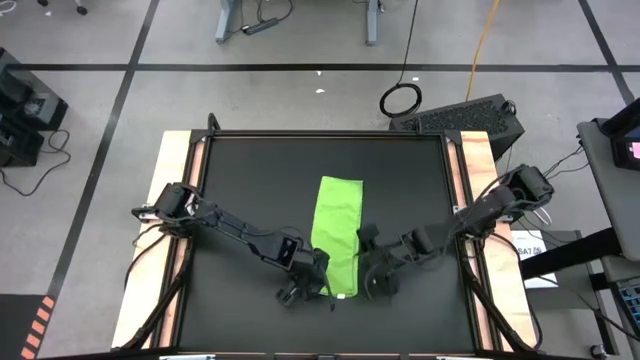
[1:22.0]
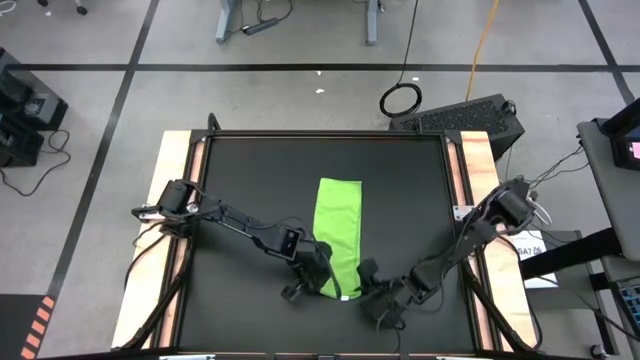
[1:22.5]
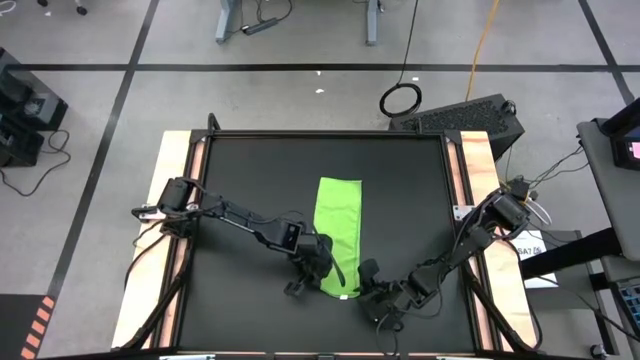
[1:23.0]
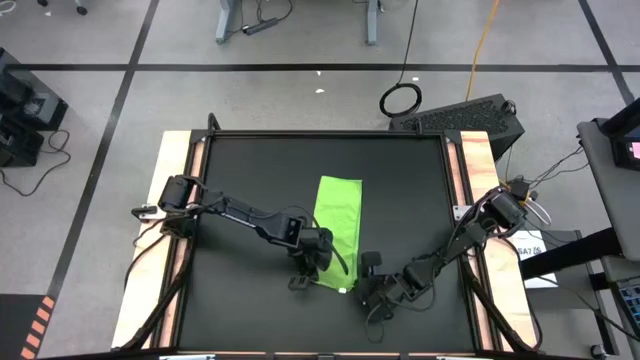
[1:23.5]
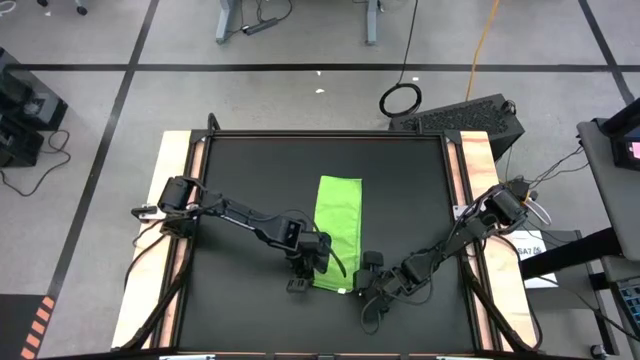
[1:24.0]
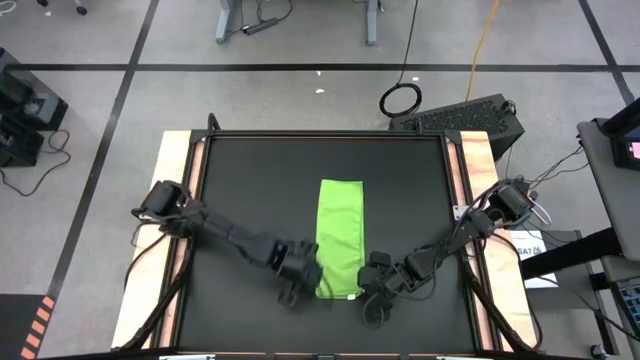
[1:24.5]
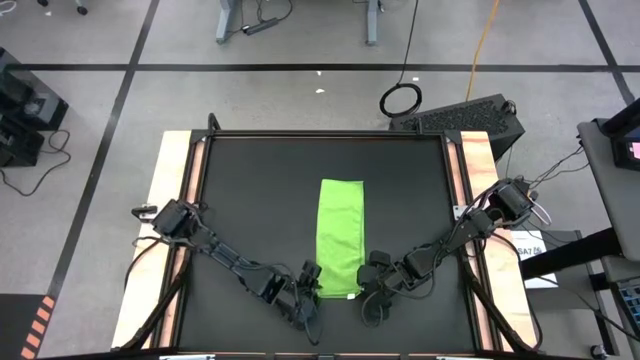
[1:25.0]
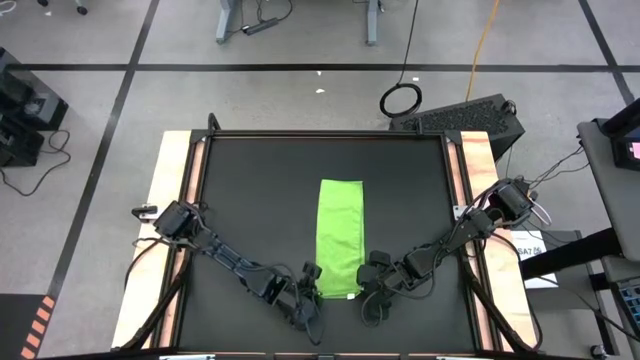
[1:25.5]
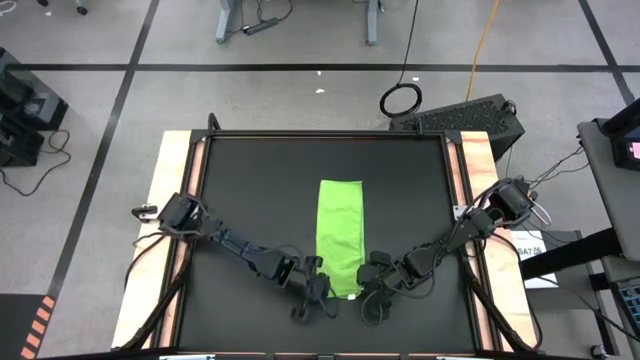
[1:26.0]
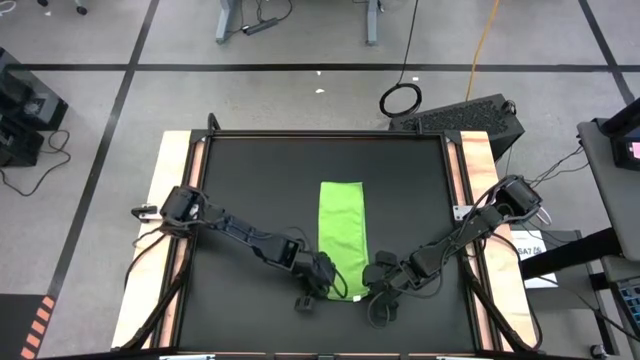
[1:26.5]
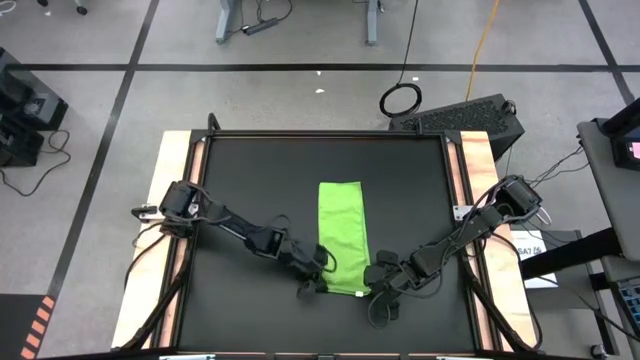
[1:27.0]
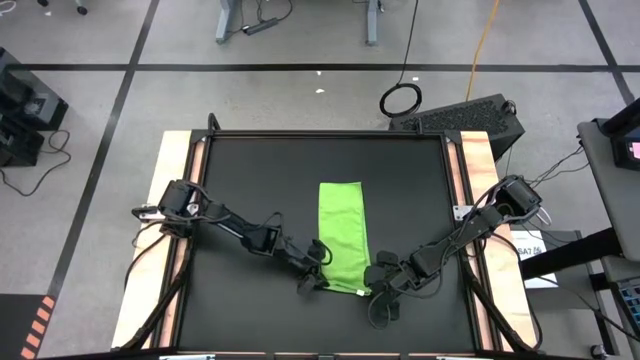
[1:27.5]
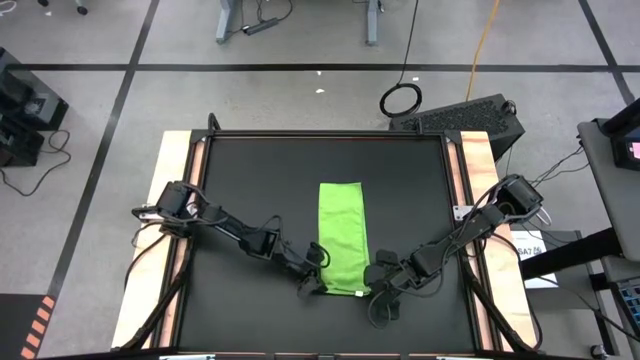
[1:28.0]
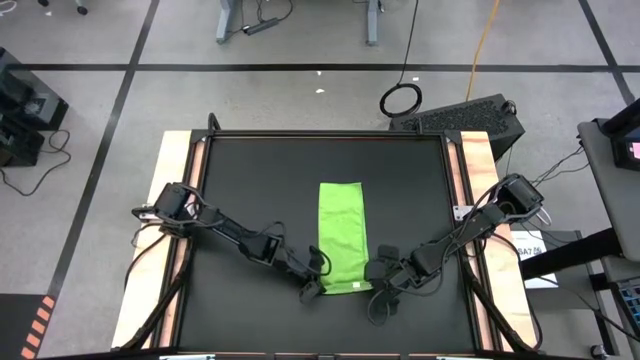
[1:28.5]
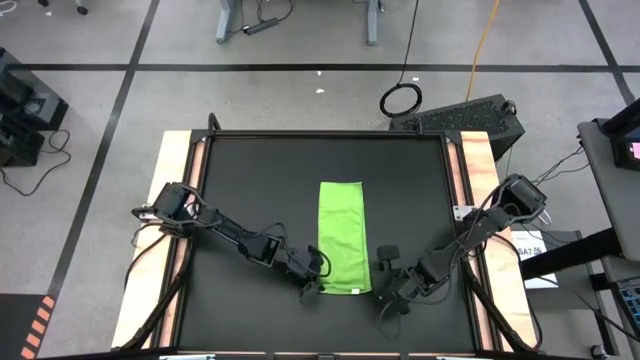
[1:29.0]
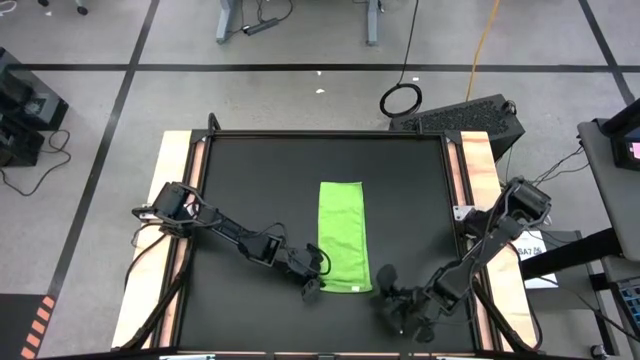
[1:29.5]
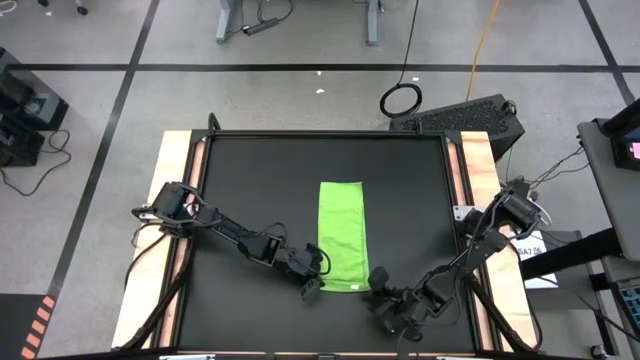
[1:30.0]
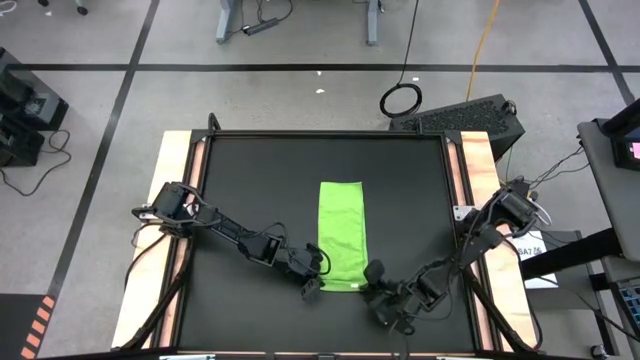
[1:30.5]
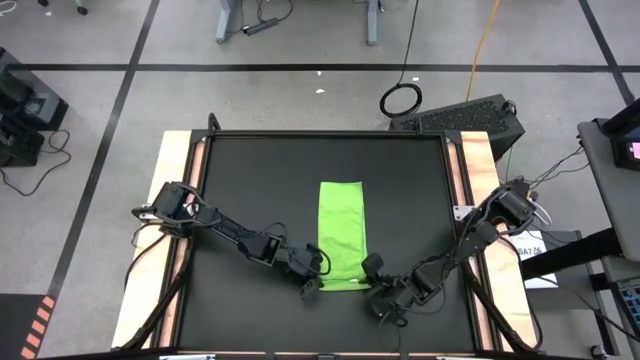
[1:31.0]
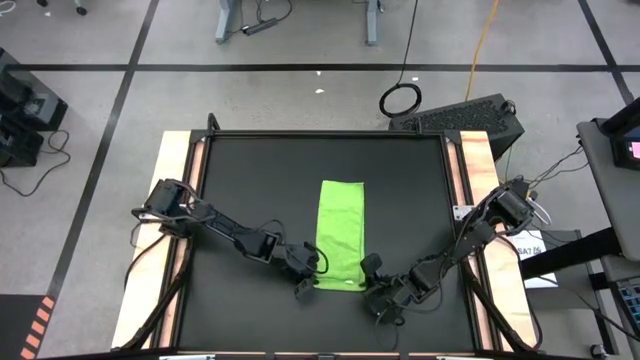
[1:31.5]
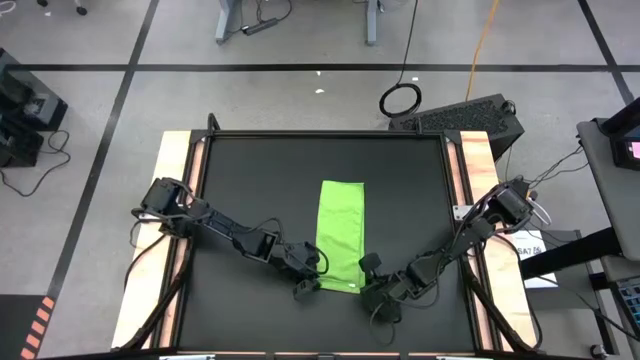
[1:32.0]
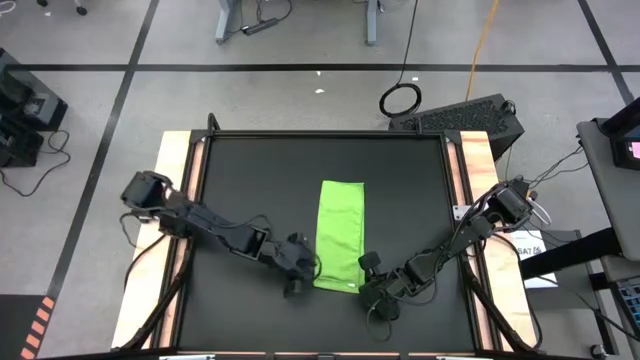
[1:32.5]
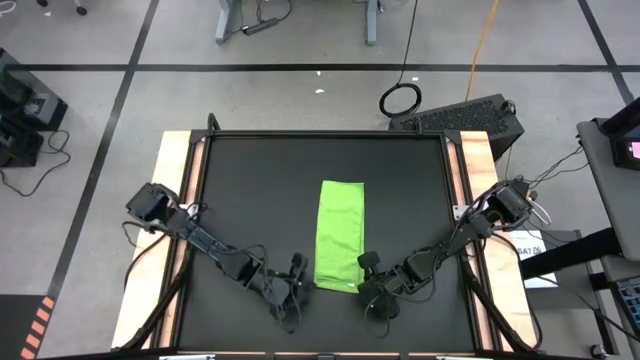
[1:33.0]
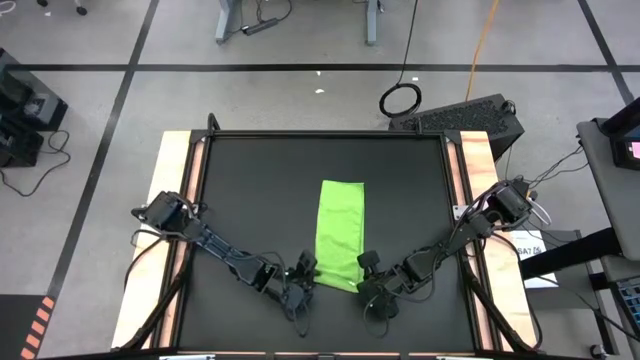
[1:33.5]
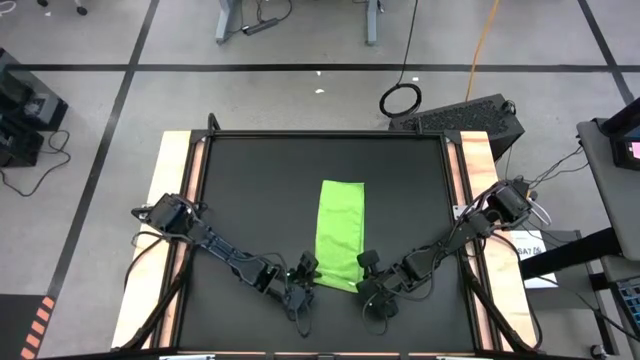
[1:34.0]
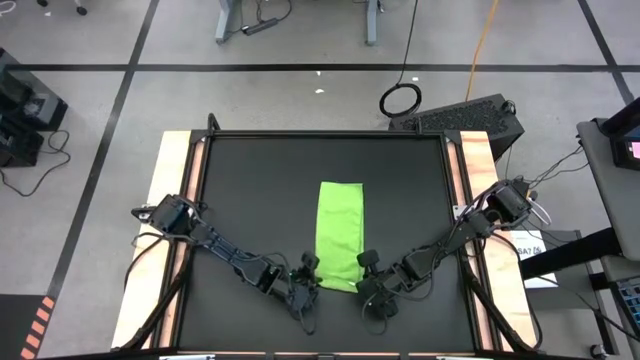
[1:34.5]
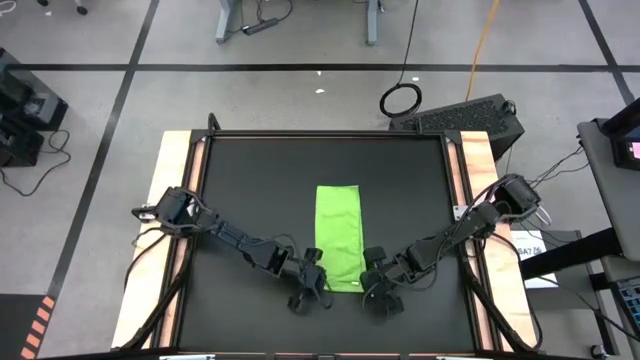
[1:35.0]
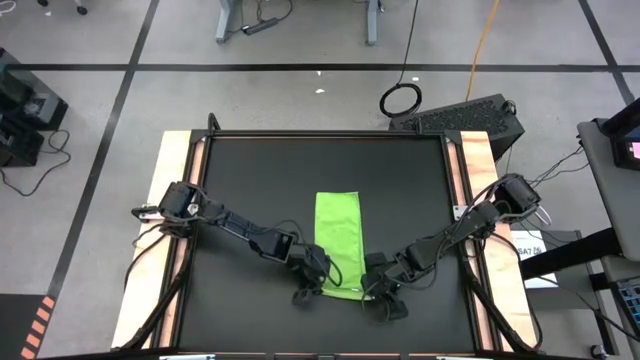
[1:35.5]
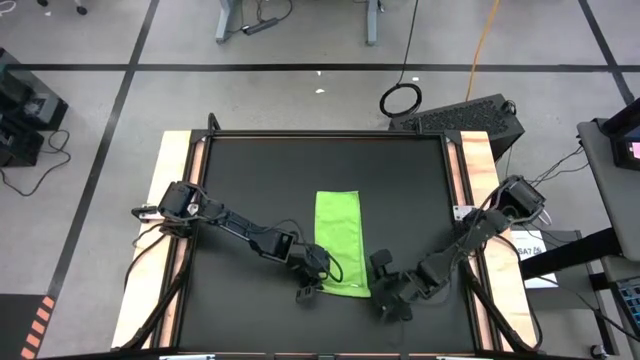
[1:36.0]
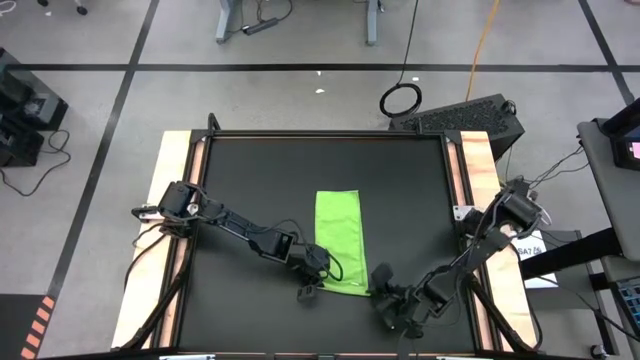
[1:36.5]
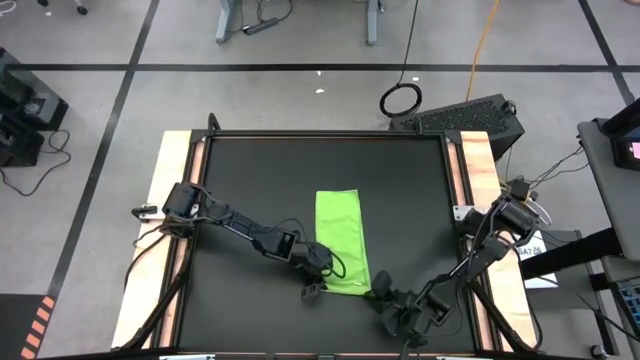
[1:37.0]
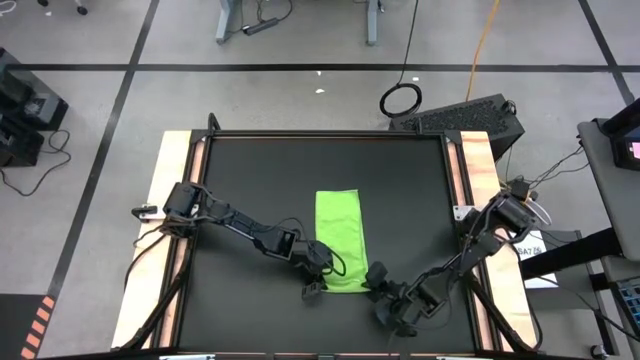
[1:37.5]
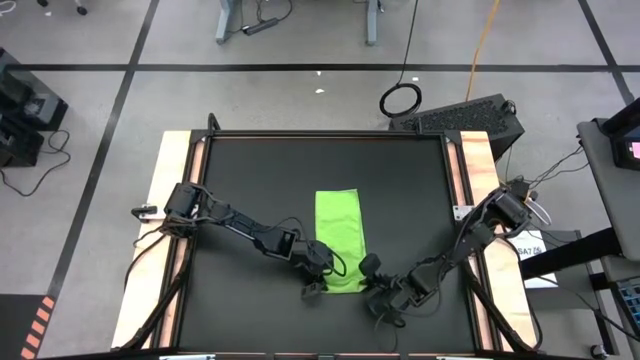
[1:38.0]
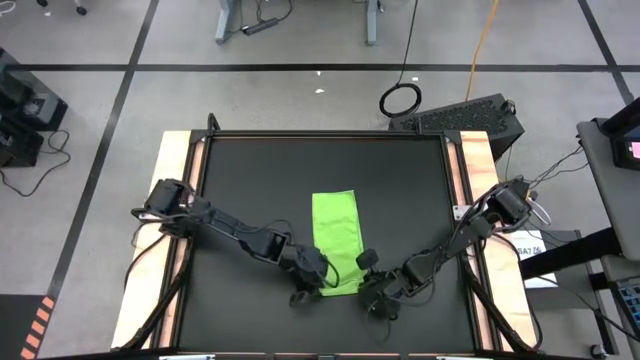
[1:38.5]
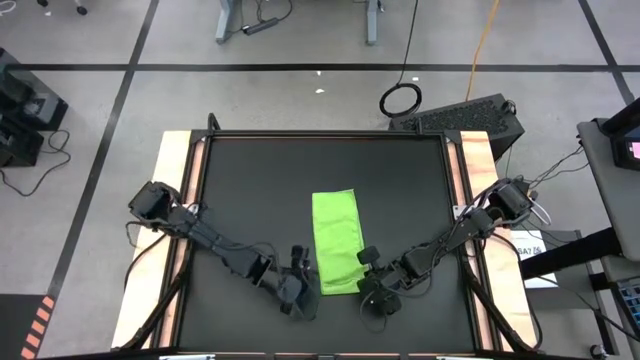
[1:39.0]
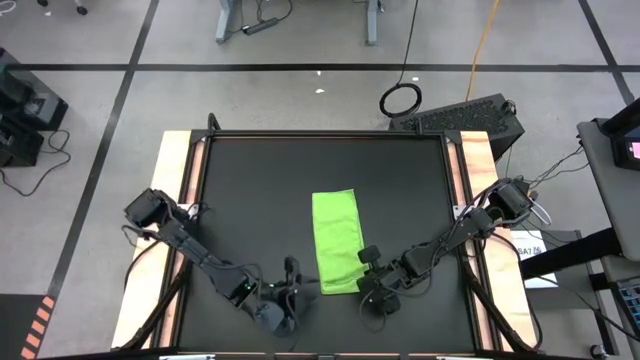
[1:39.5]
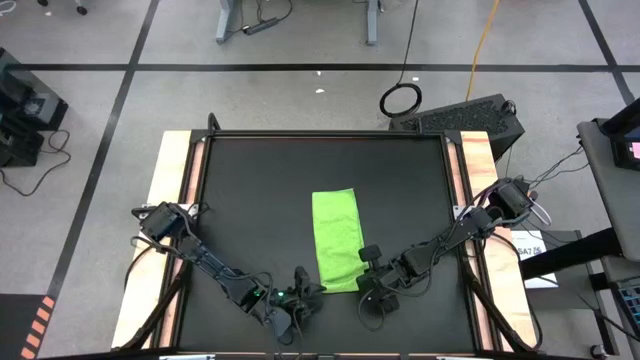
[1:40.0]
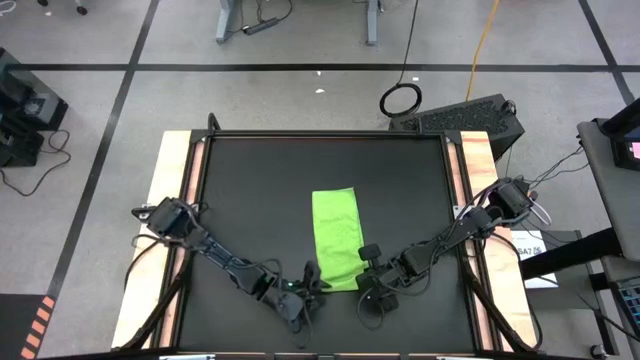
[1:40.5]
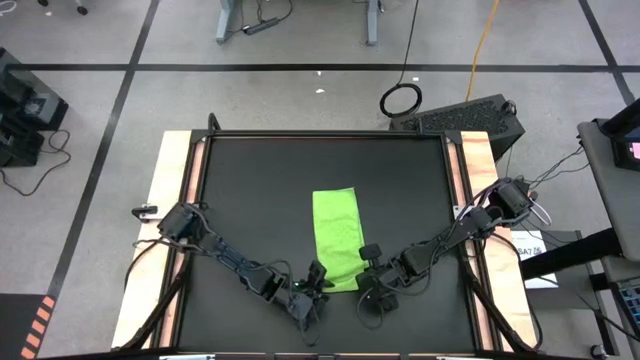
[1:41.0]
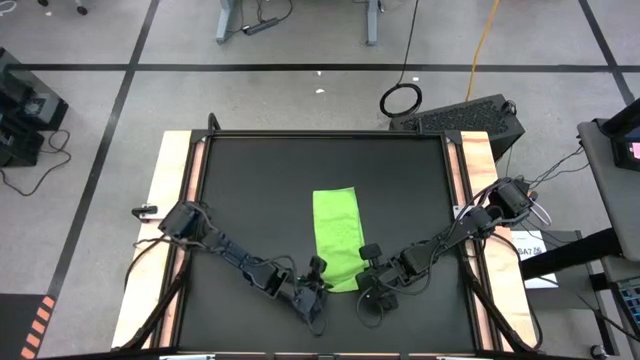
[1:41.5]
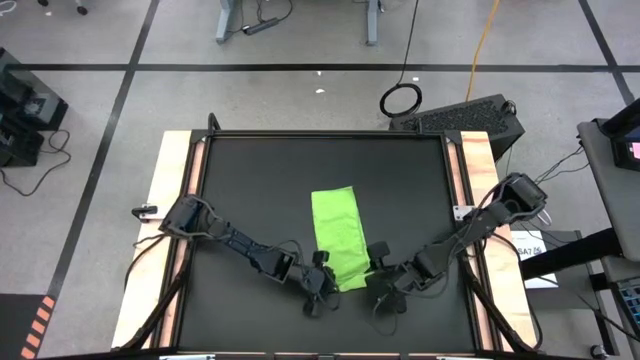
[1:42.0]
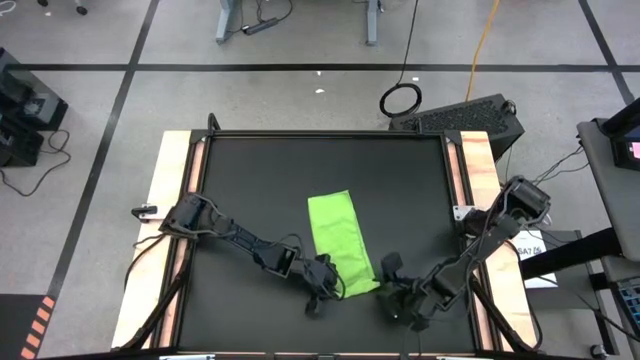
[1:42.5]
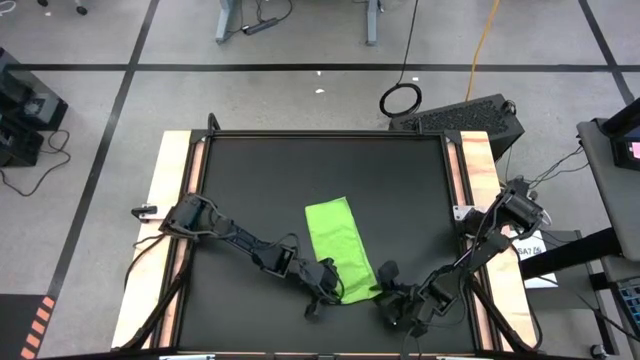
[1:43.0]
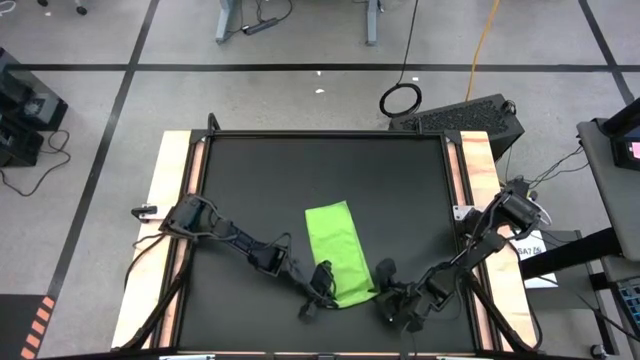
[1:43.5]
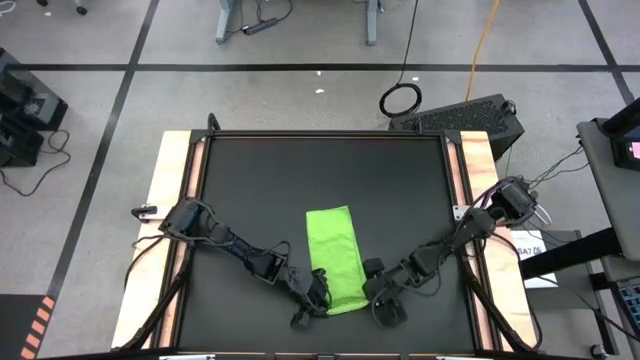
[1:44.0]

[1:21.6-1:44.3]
Task: Roll towel
Roll the green microfiber towel
